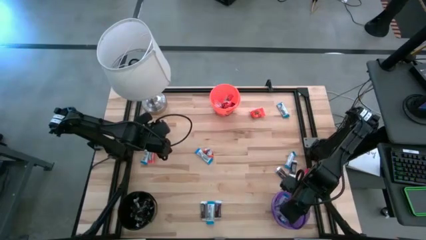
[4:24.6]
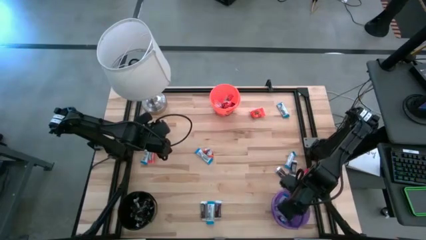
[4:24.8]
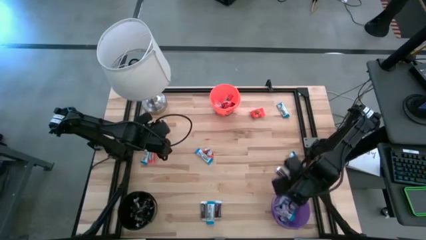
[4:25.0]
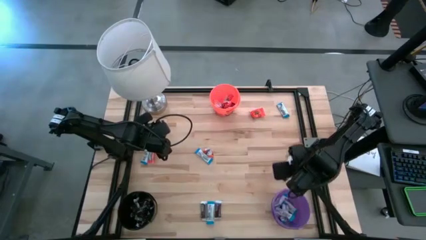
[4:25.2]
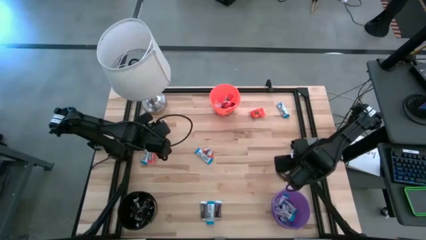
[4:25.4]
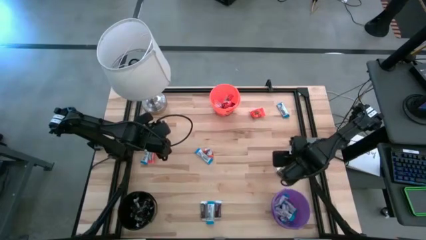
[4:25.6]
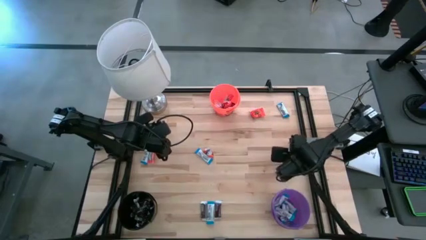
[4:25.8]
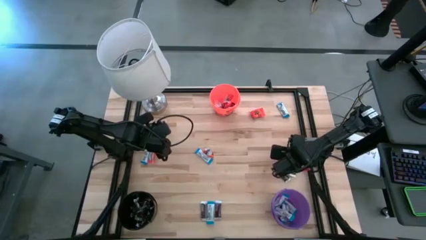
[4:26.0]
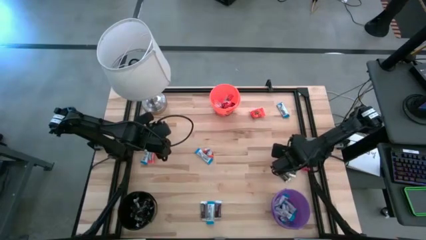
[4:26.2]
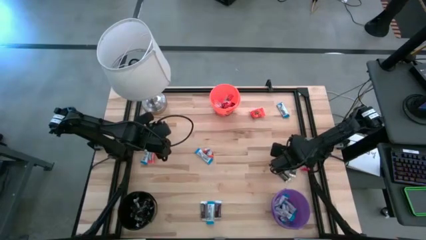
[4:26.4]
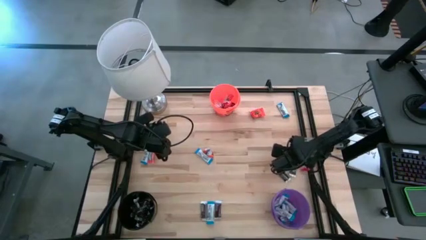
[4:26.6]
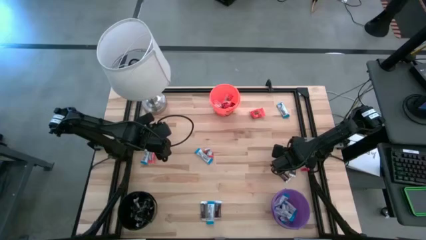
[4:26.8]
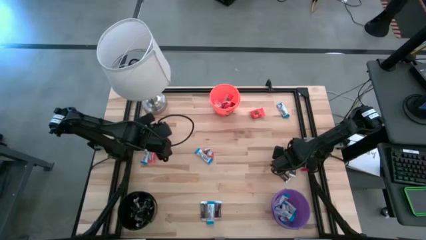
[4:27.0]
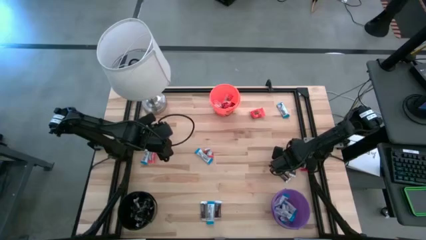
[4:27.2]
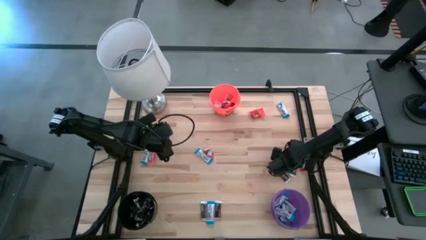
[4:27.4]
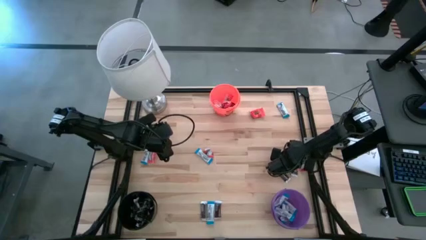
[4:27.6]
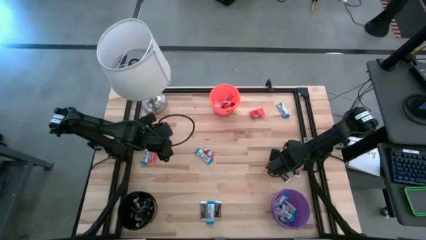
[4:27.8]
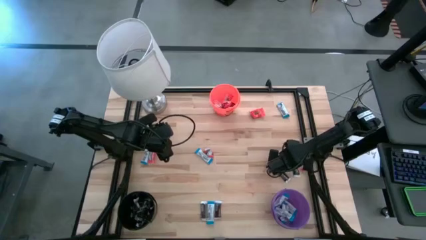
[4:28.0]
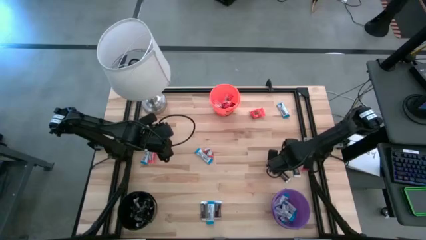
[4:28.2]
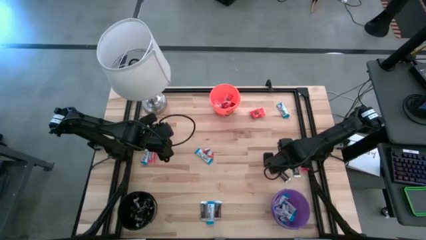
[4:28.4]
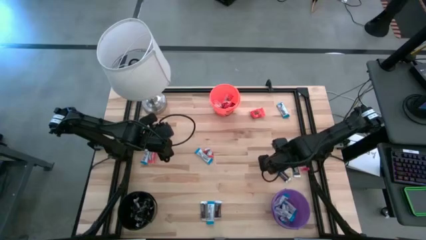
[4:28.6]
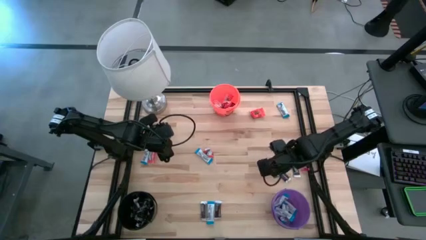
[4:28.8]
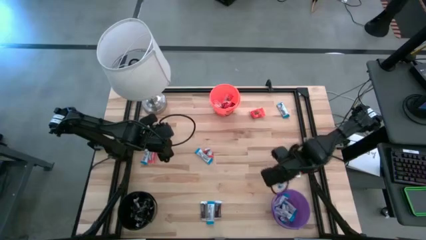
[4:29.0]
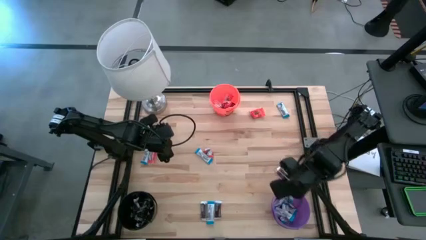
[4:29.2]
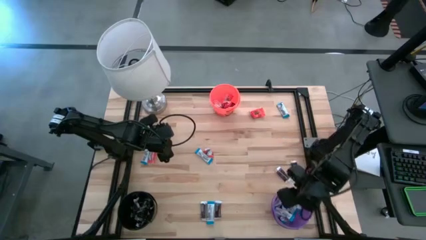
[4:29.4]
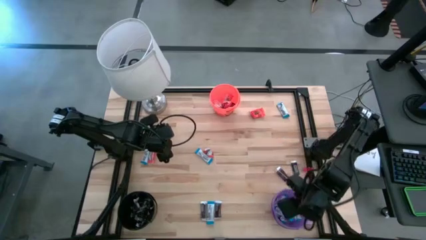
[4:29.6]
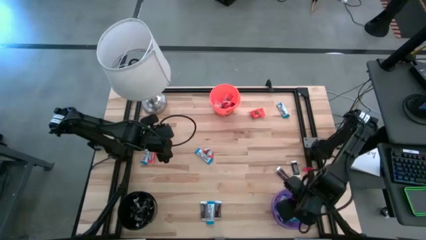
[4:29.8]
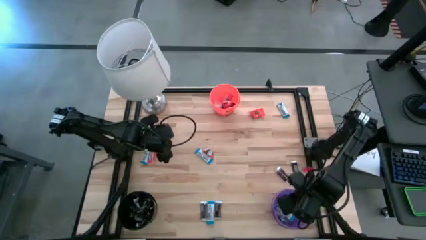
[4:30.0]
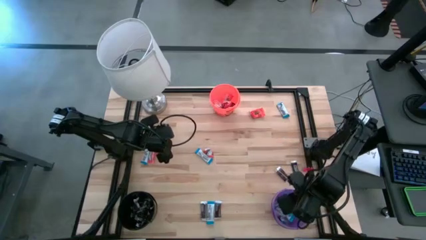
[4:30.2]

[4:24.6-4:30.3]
Task: Organize candy in baskets
Put the white chocolate into the purple bucket

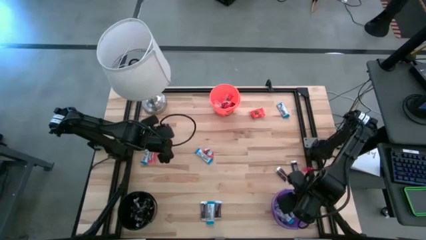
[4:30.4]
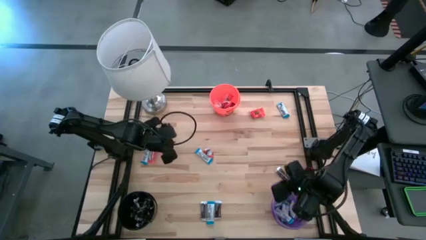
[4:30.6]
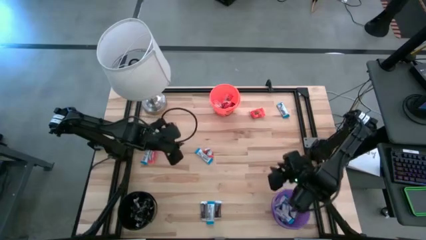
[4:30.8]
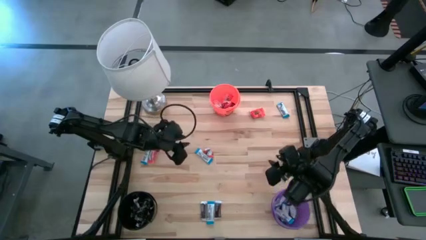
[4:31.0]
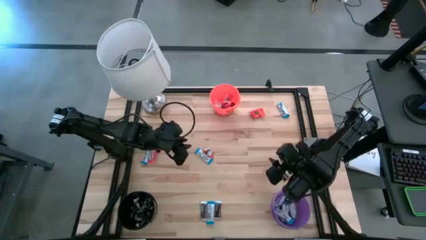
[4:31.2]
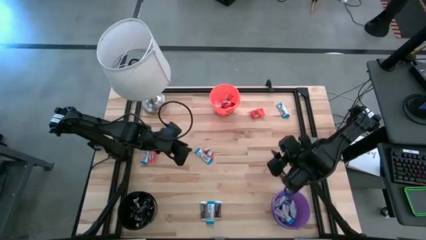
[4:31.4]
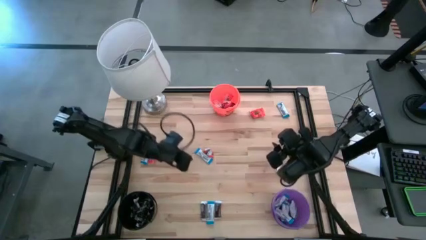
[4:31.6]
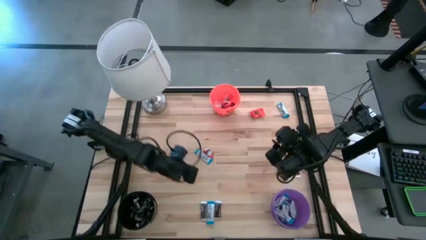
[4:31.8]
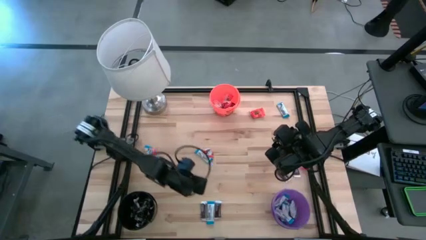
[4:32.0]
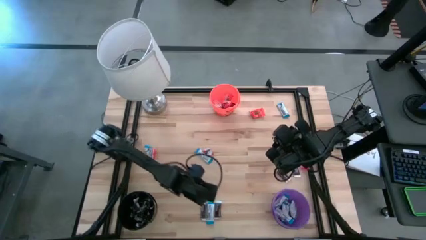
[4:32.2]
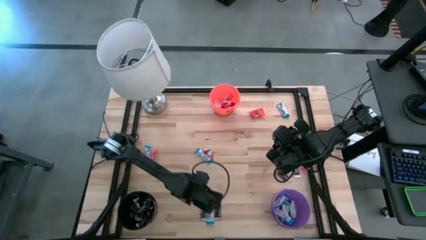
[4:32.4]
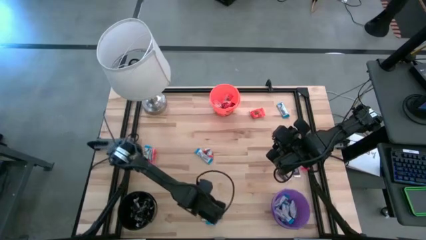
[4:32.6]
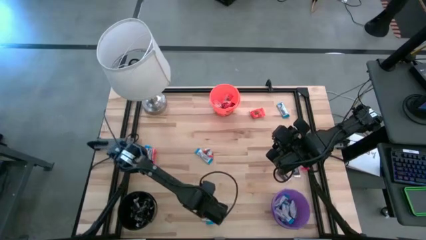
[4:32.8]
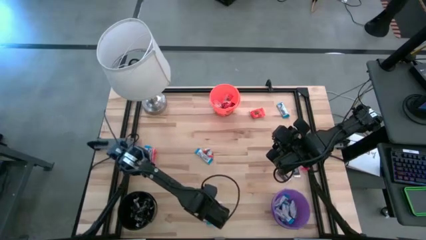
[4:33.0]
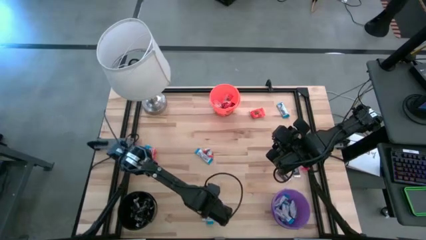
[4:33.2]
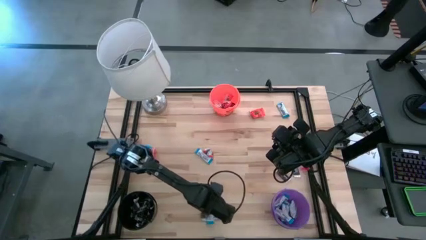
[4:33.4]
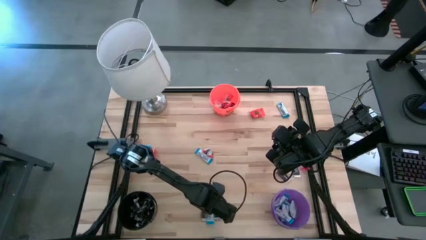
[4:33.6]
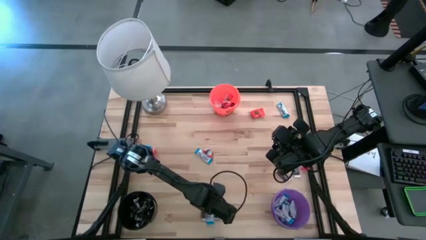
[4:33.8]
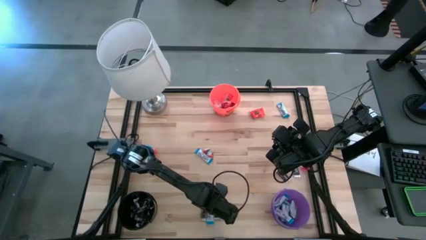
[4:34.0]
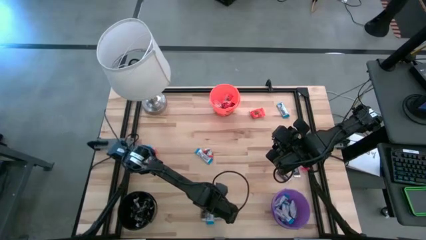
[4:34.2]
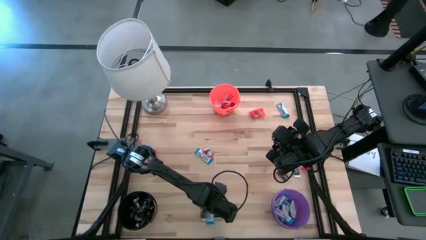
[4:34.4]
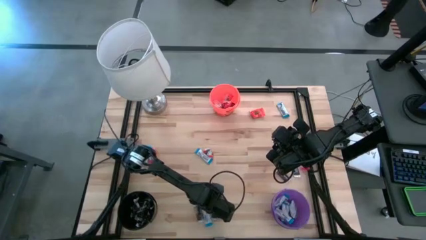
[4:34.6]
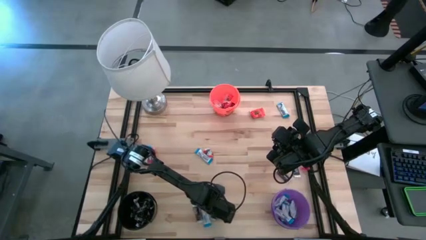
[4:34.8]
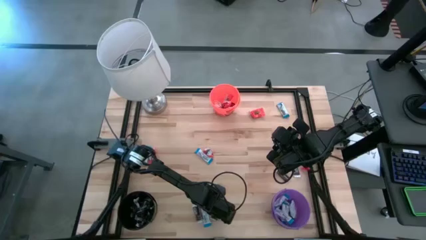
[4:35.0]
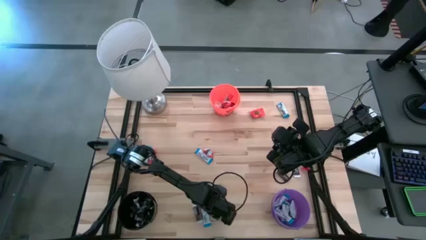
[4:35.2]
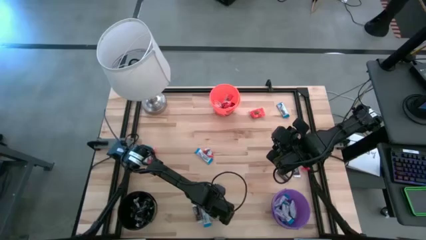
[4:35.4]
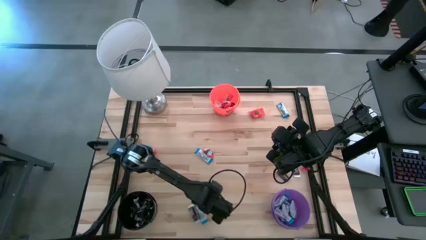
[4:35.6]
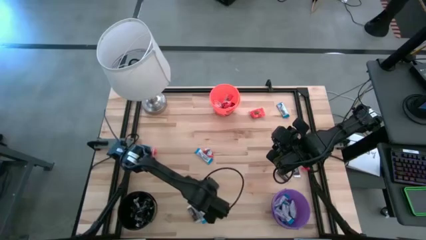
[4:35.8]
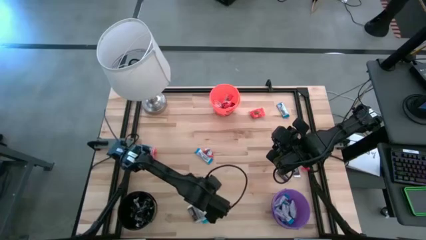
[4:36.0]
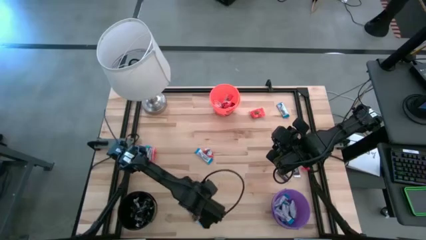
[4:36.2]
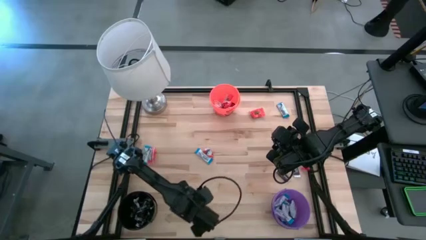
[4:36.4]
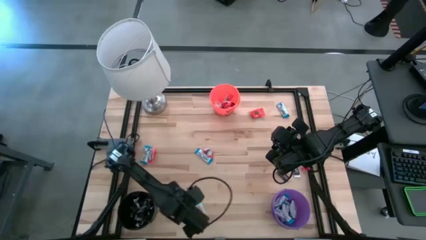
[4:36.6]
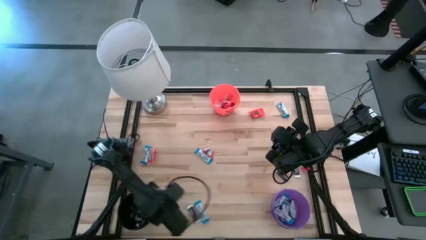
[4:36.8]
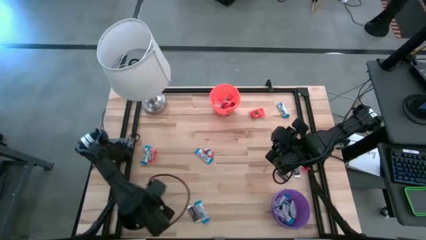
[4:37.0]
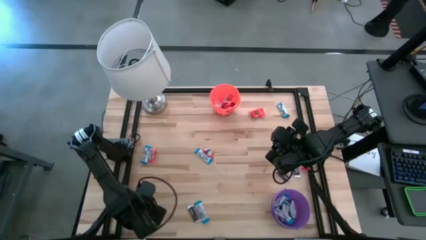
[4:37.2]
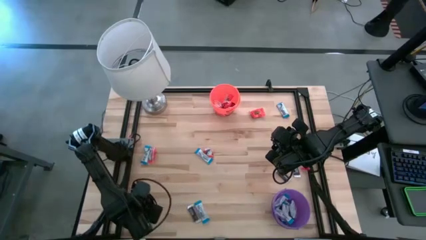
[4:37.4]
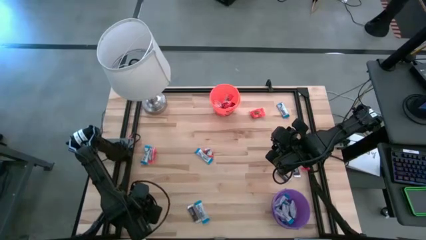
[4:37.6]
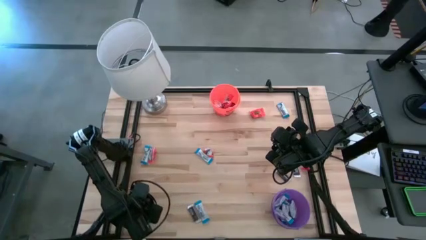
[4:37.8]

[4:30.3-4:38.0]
Put the brown chocolate into the black bucket
